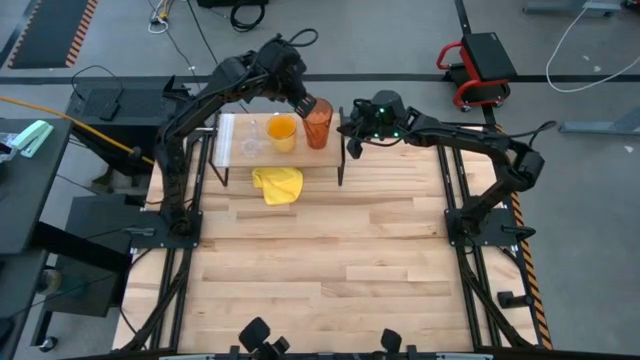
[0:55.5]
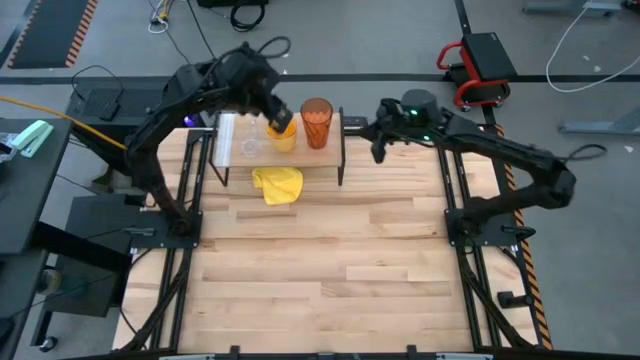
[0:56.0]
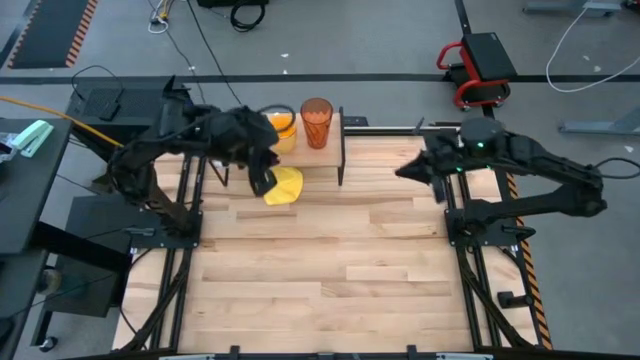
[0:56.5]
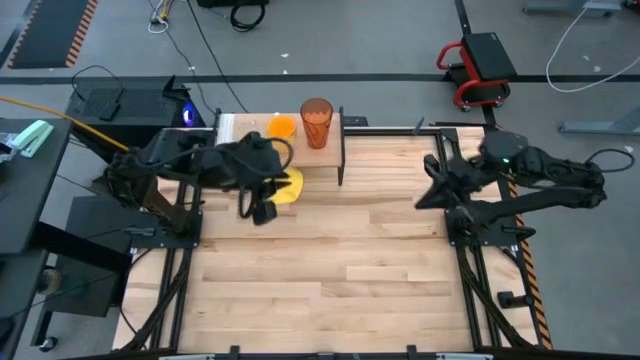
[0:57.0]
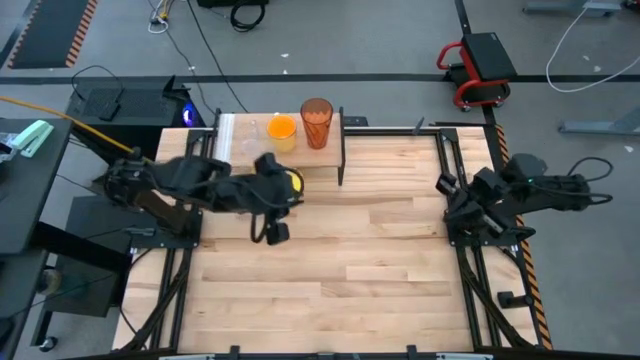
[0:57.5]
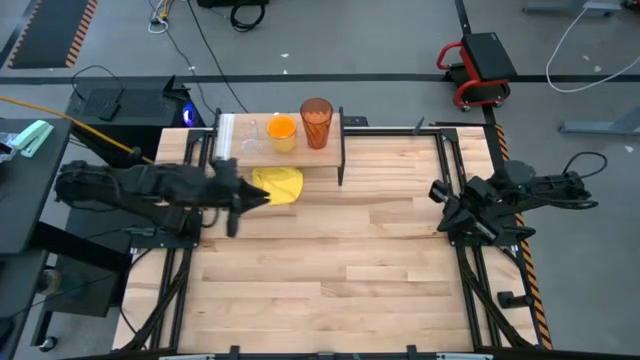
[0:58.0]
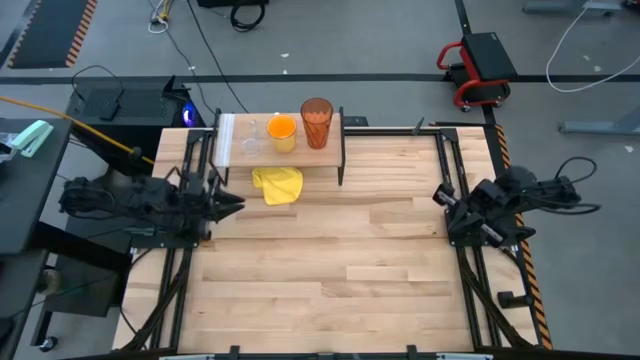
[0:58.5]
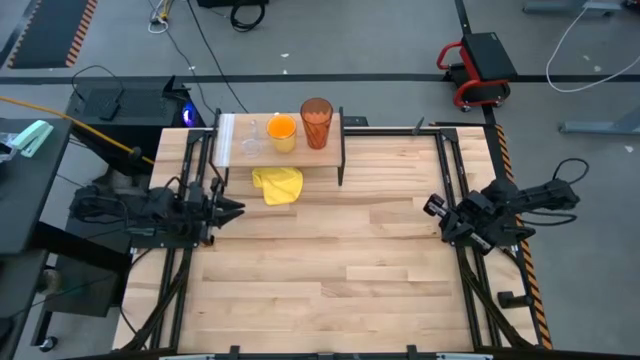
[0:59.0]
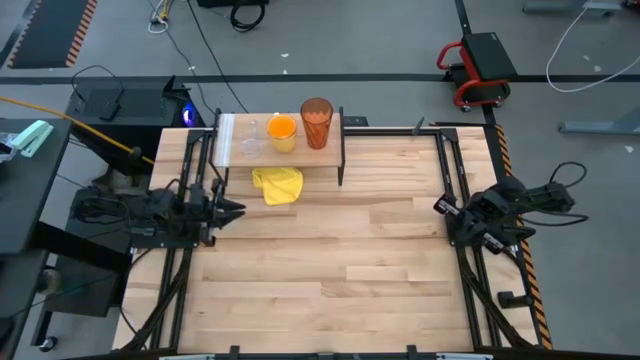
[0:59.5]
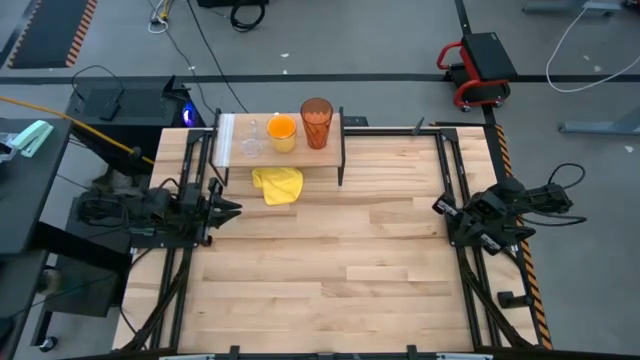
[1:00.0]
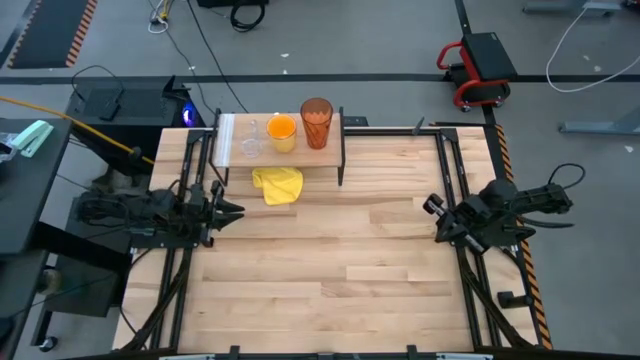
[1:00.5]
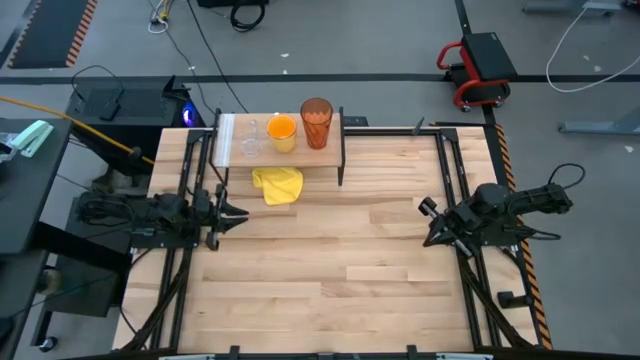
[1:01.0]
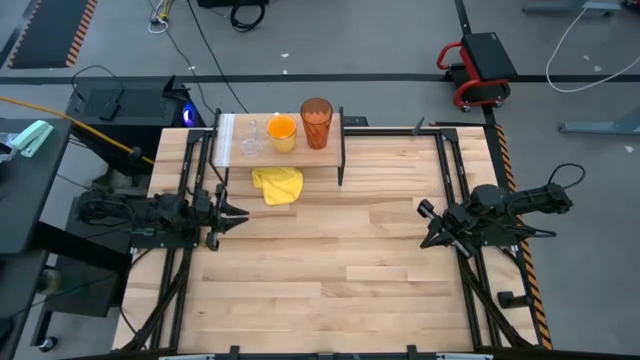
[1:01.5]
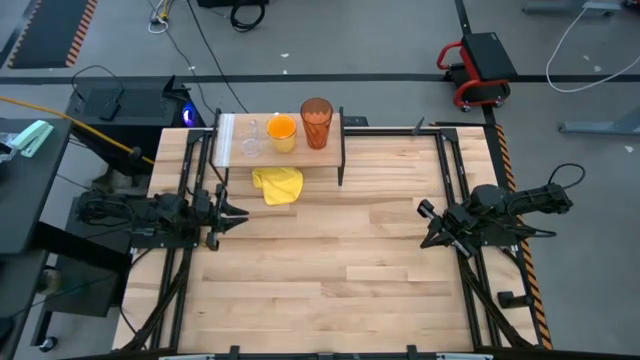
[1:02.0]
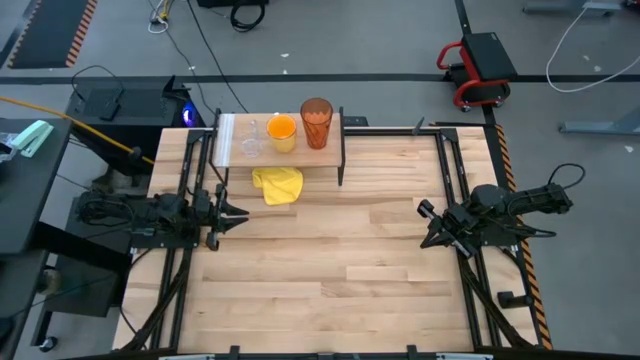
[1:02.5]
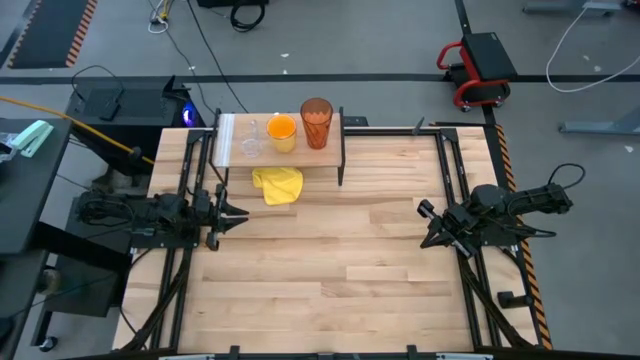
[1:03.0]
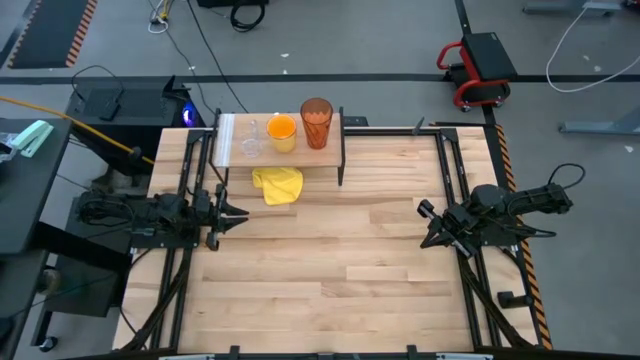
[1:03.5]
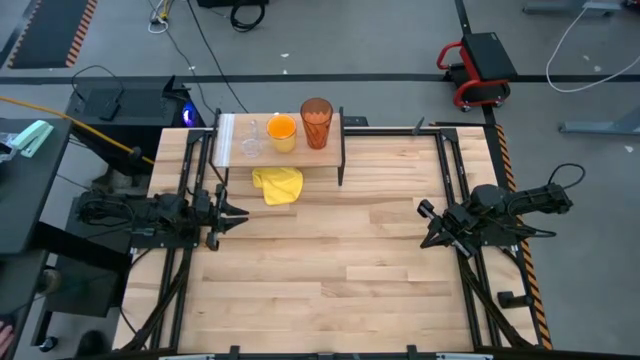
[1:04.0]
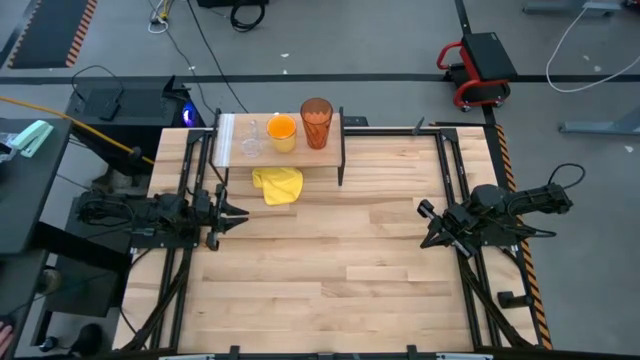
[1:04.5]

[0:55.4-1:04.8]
Task: Stack small to large cups/mugs on shelf
Return to Home Position

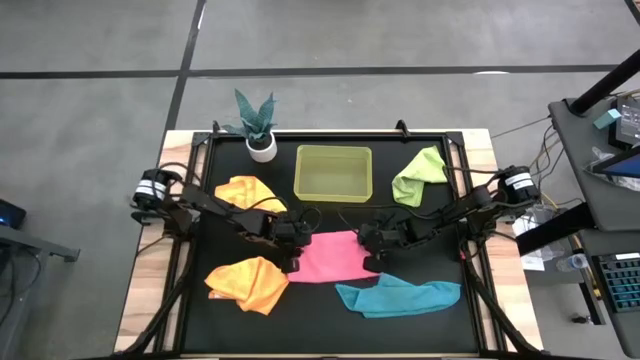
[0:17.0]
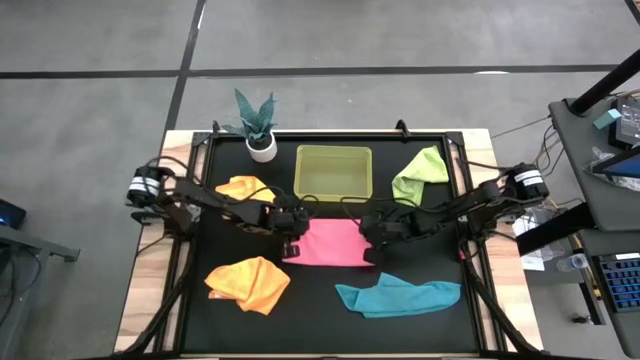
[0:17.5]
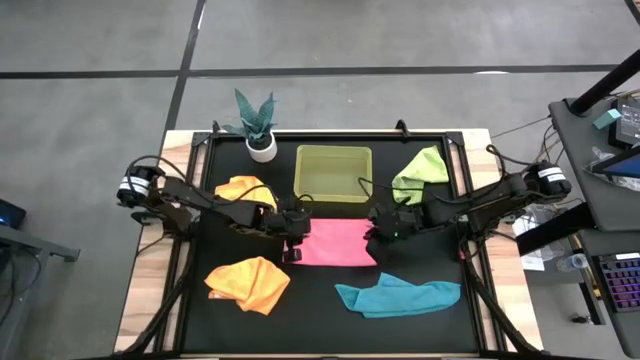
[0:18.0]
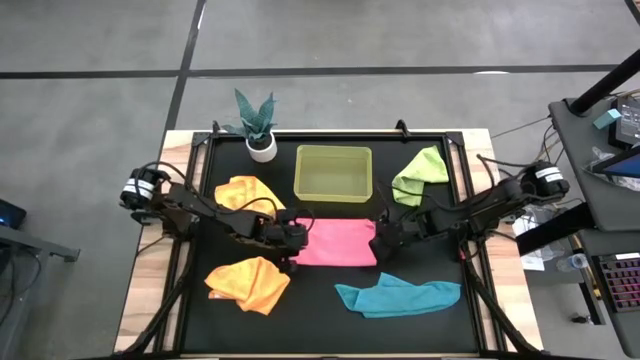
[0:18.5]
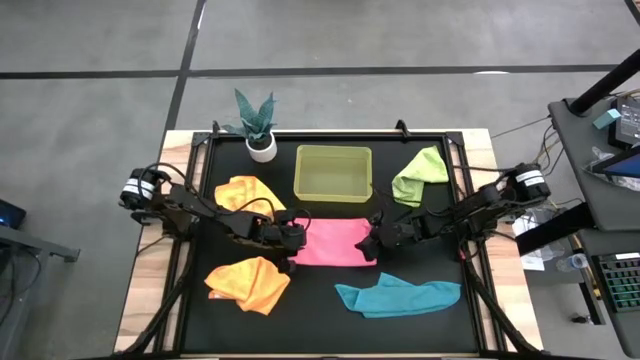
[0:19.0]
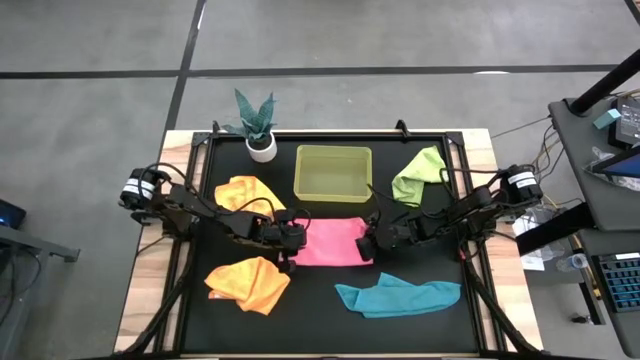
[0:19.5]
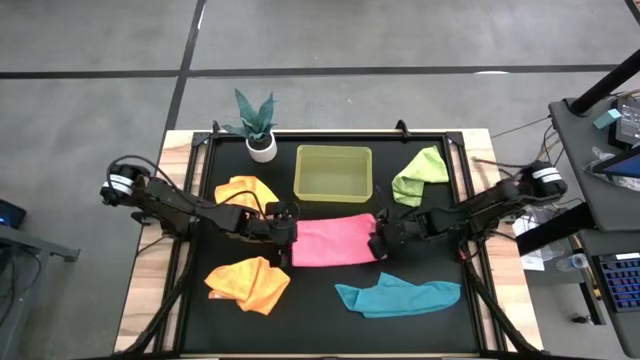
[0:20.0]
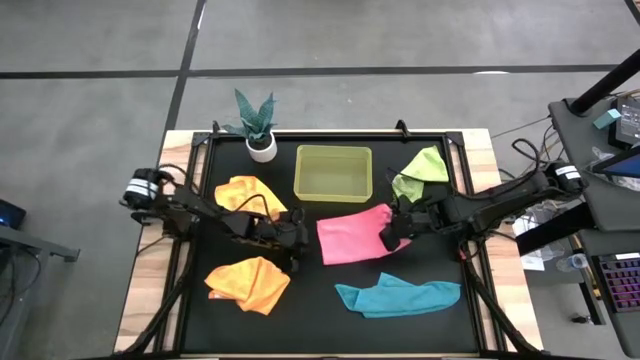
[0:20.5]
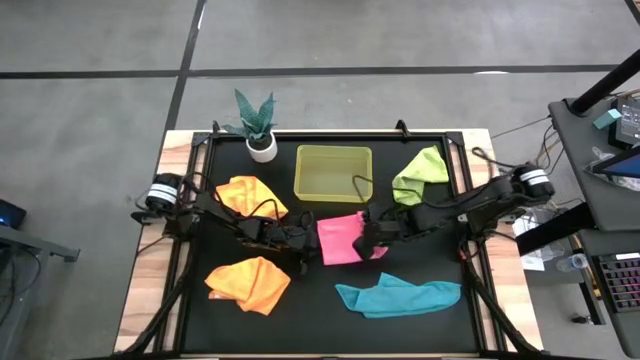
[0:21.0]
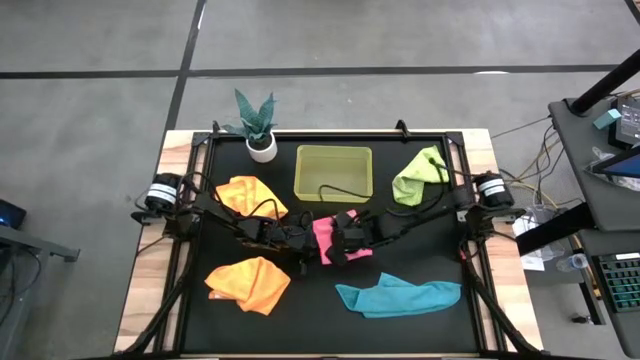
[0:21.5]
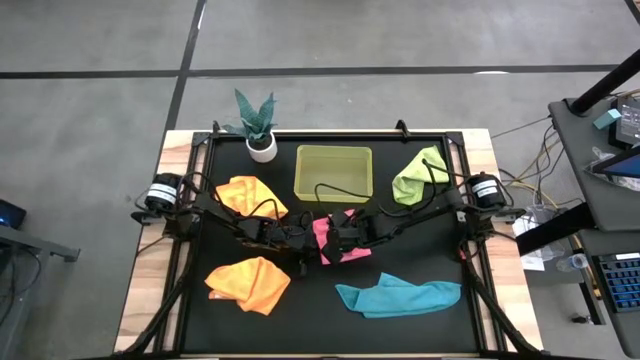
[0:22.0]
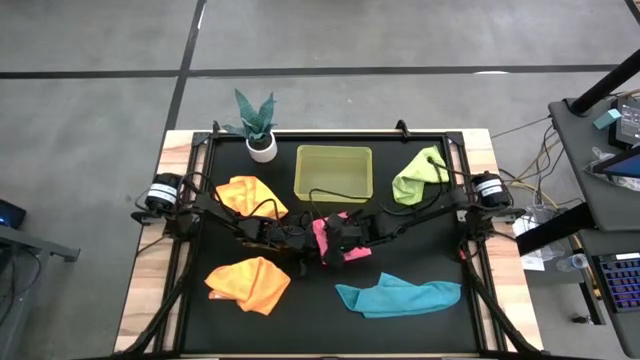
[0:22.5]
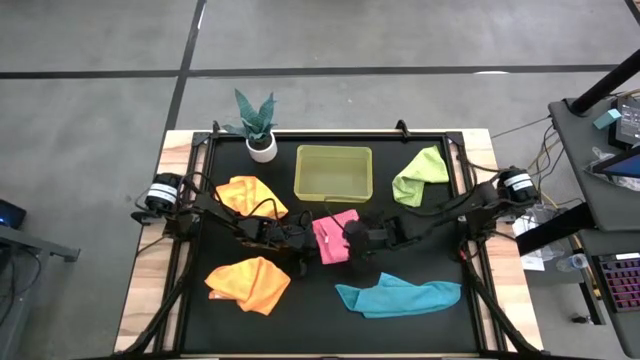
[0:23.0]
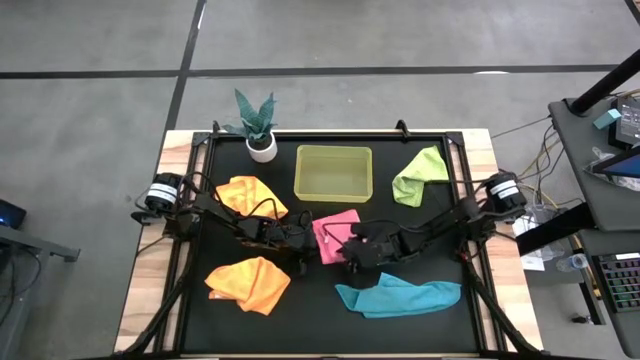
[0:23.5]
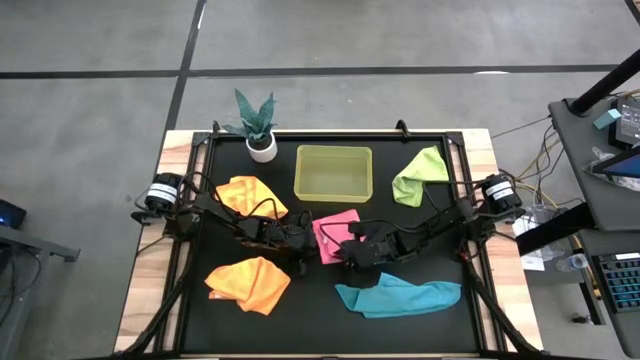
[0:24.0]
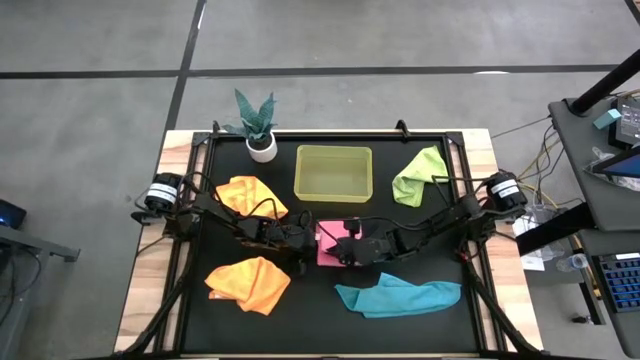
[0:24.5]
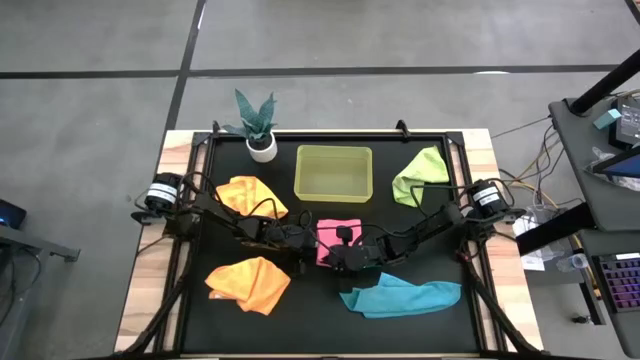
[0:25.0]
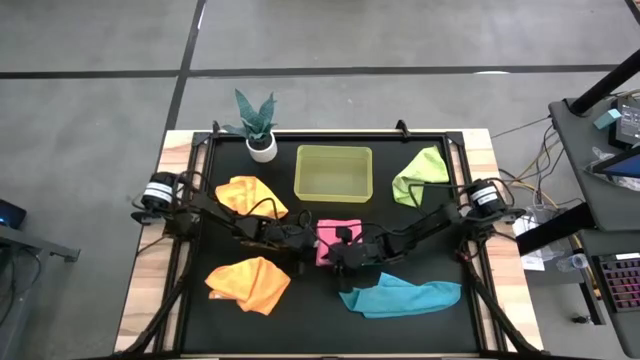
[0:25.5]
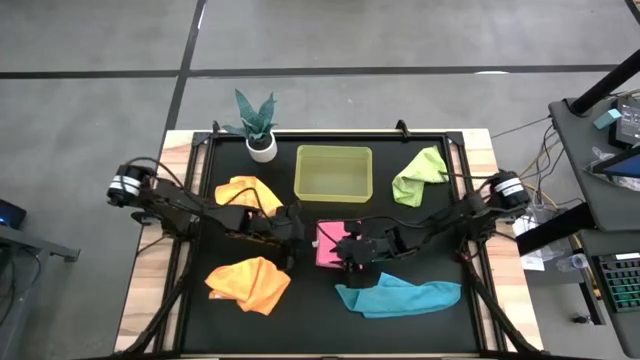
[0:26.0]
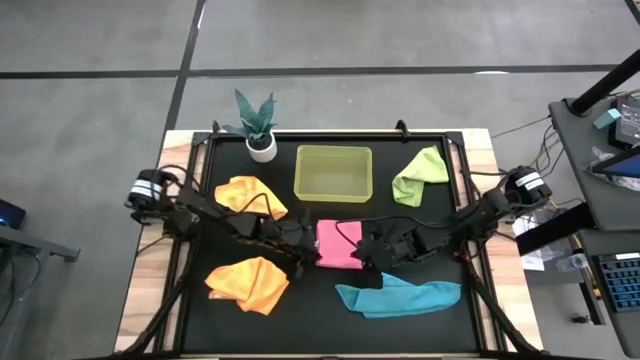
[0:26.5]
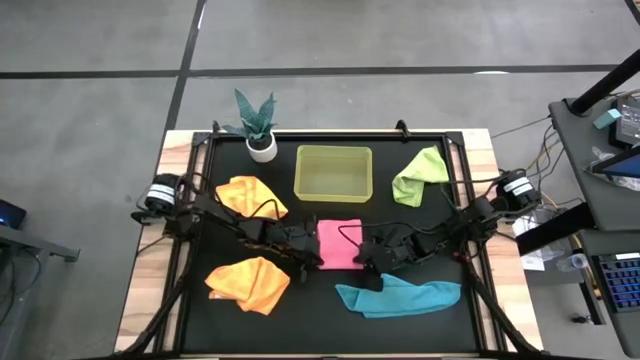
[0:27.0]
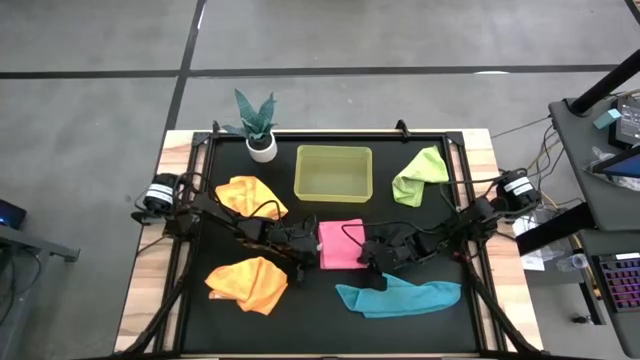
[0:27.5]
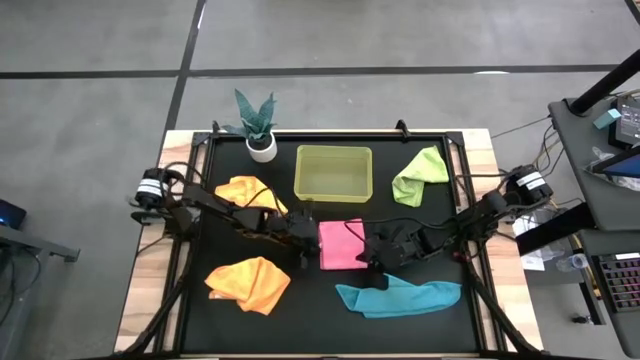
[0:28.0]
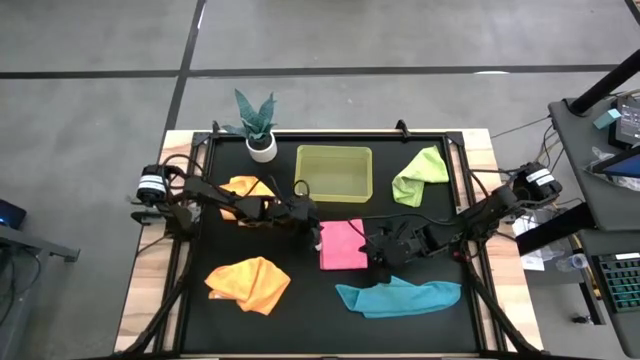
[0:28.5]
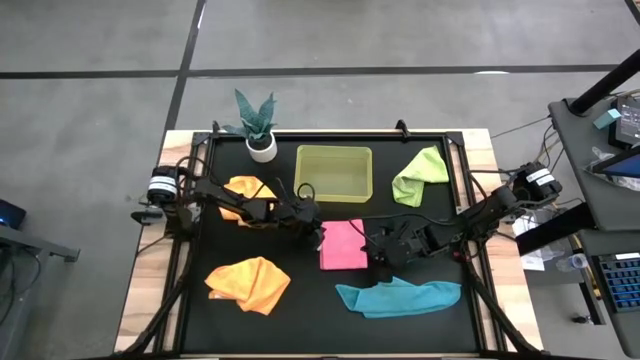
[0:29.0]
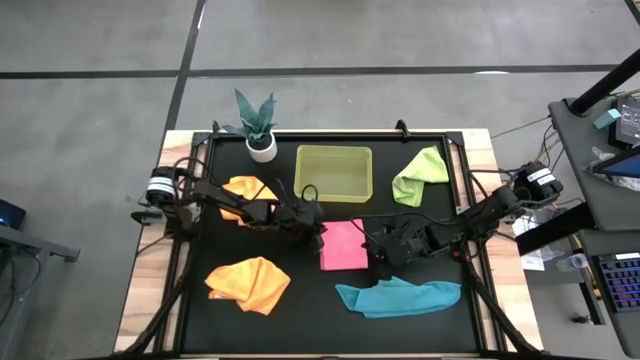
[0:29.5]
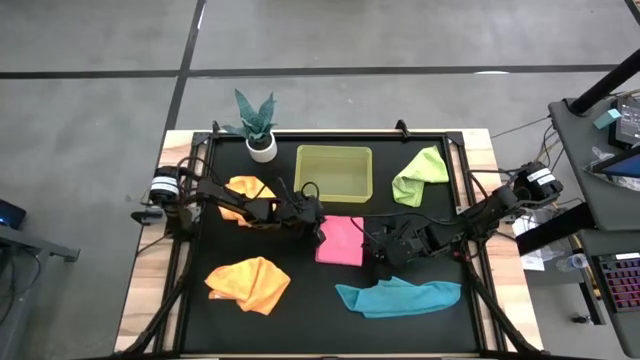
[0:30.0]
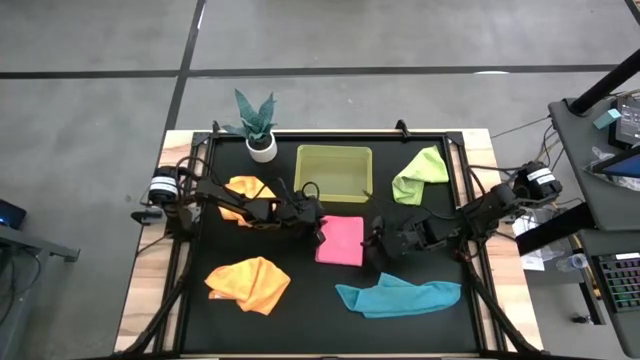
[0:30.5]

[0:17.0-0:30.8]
Task: Fold microfiber towels
Fold the pink towel on the table
